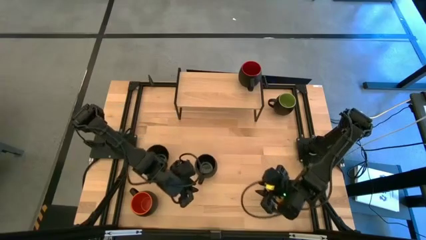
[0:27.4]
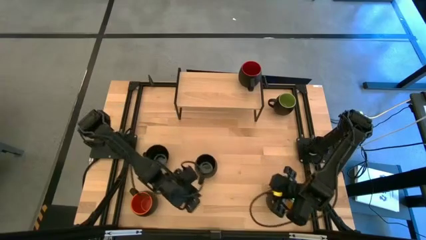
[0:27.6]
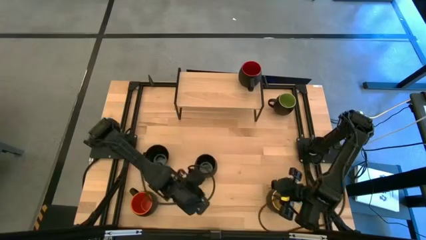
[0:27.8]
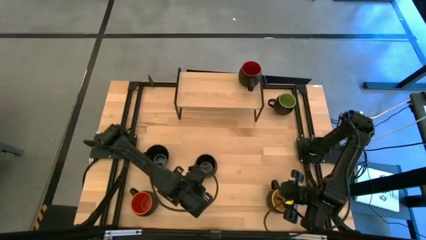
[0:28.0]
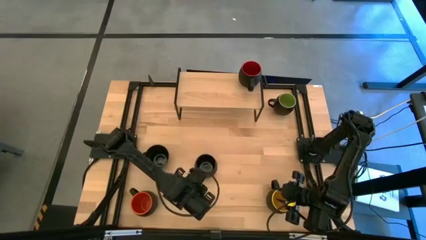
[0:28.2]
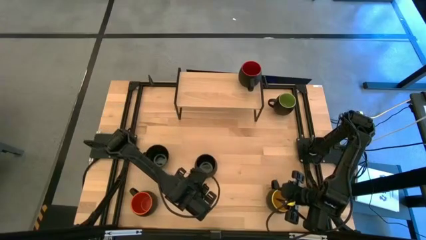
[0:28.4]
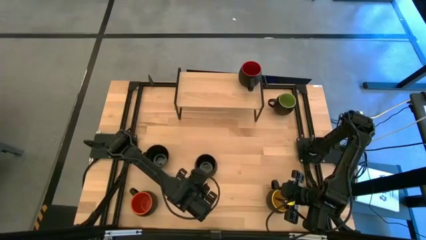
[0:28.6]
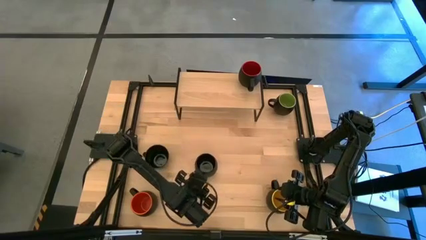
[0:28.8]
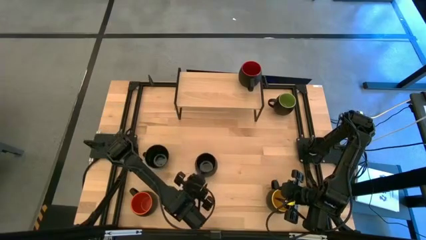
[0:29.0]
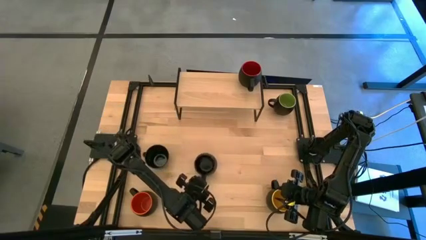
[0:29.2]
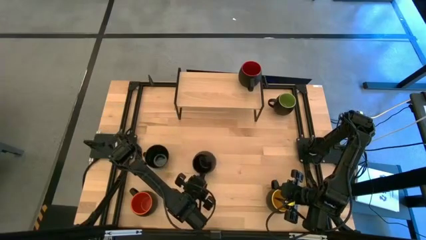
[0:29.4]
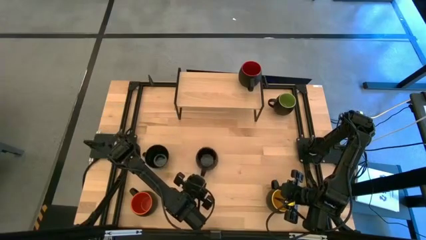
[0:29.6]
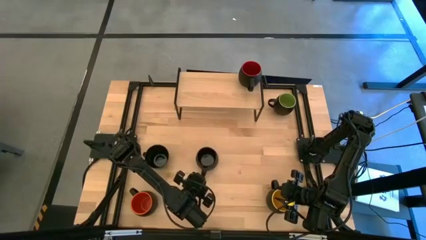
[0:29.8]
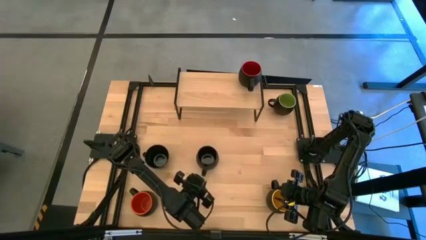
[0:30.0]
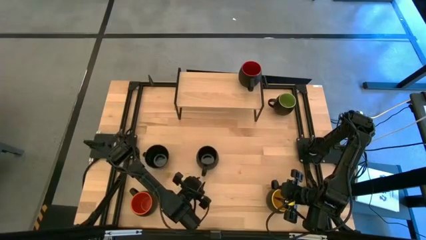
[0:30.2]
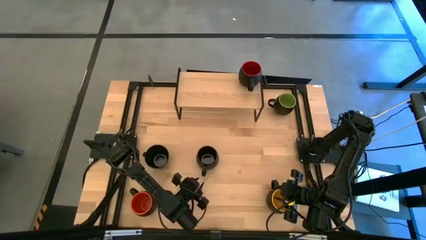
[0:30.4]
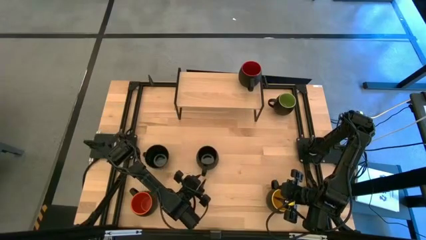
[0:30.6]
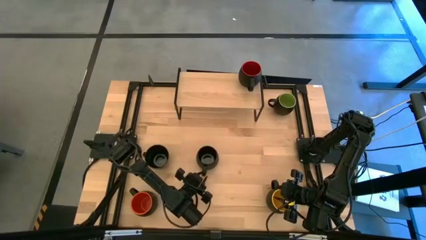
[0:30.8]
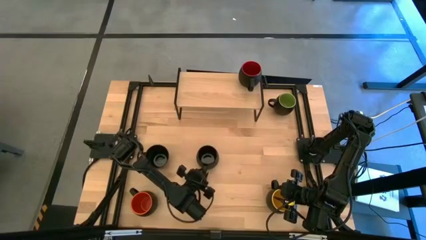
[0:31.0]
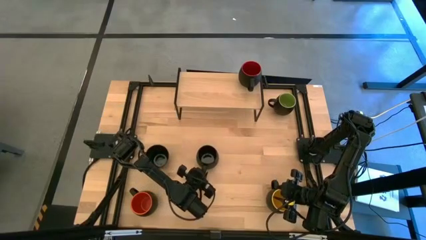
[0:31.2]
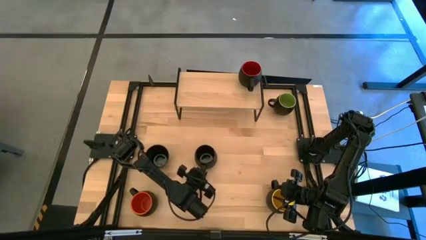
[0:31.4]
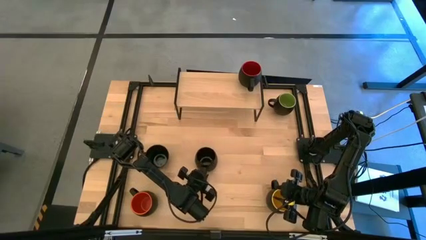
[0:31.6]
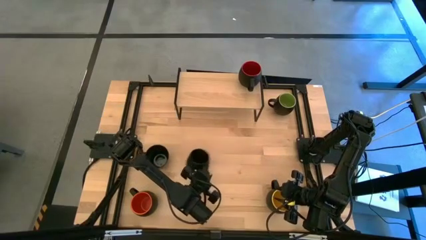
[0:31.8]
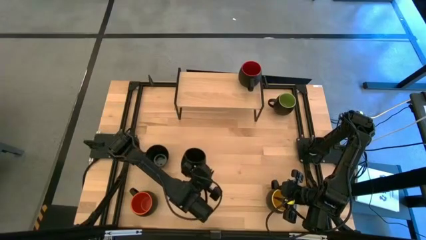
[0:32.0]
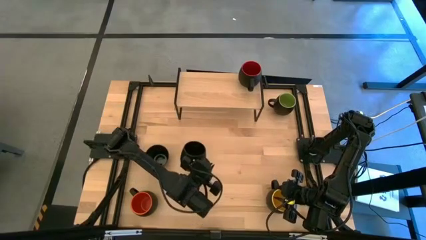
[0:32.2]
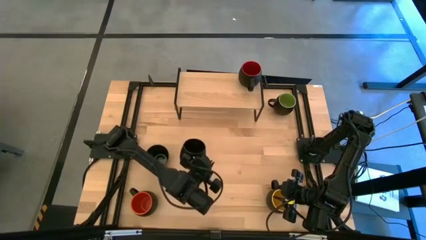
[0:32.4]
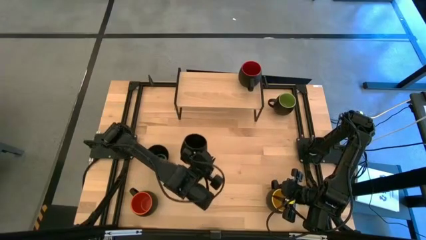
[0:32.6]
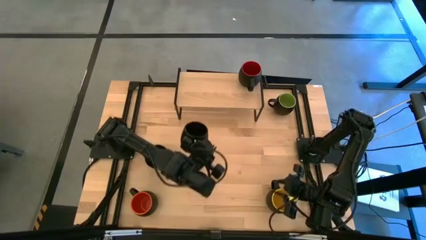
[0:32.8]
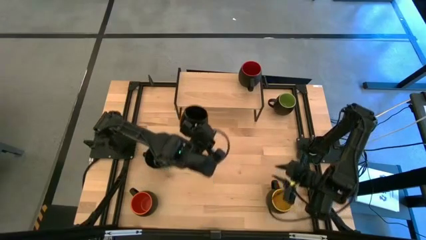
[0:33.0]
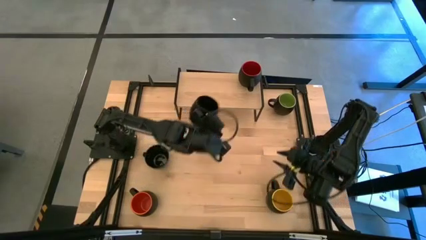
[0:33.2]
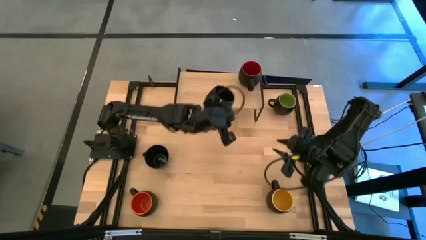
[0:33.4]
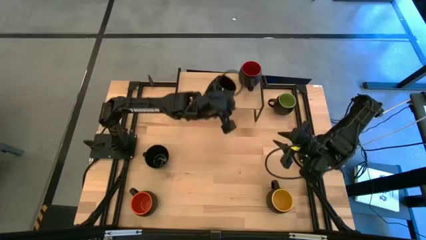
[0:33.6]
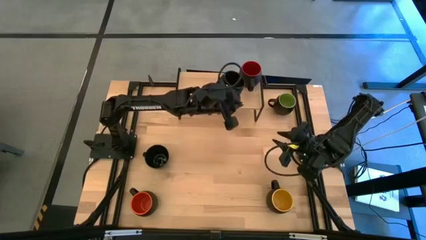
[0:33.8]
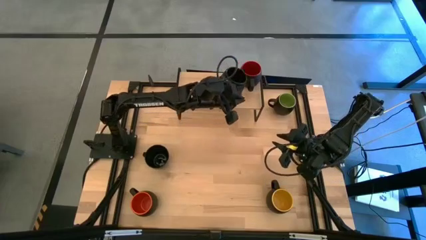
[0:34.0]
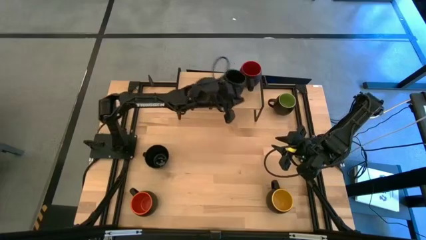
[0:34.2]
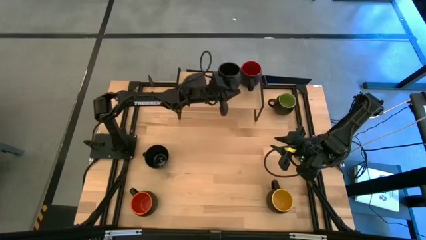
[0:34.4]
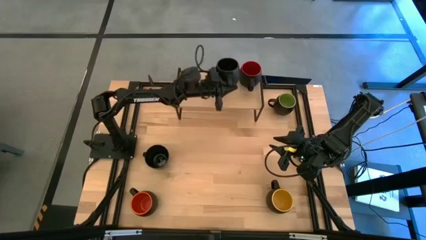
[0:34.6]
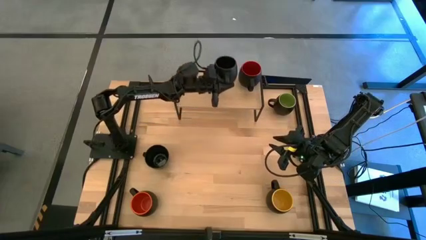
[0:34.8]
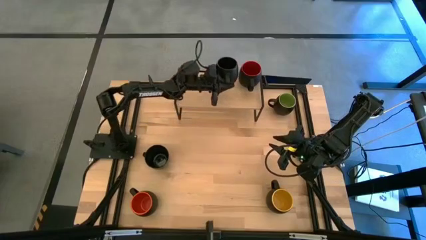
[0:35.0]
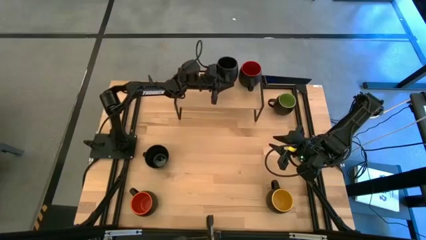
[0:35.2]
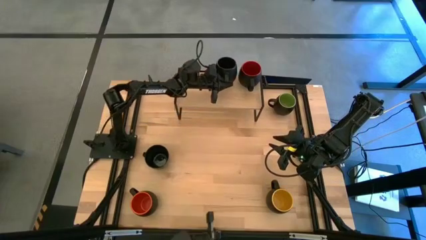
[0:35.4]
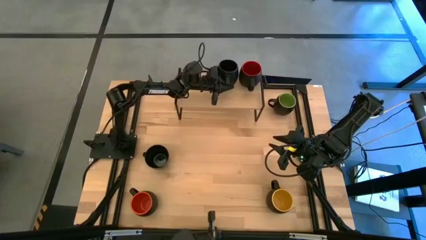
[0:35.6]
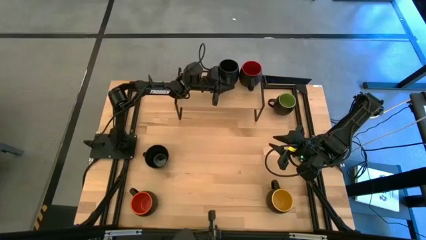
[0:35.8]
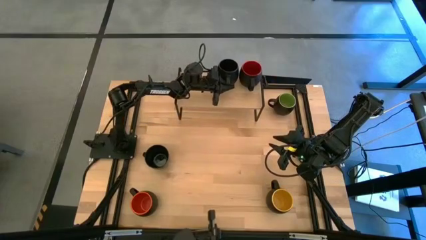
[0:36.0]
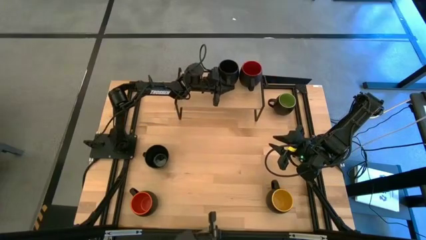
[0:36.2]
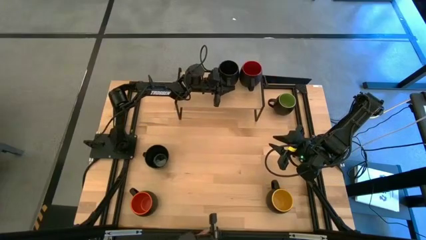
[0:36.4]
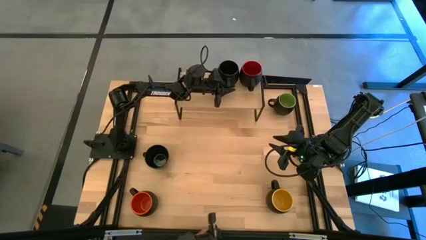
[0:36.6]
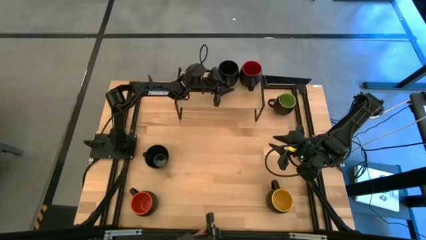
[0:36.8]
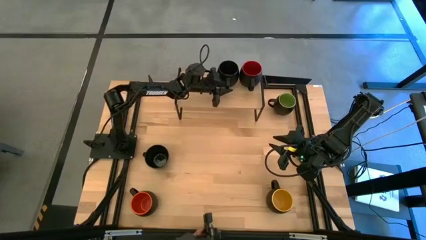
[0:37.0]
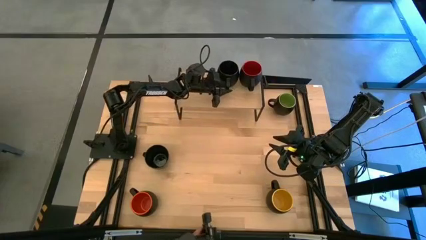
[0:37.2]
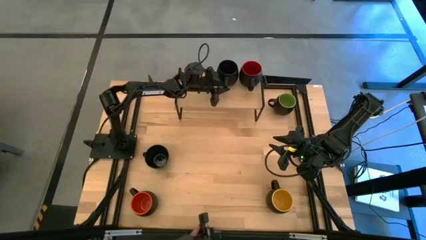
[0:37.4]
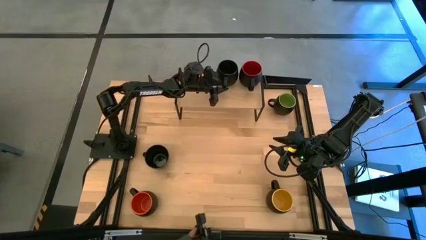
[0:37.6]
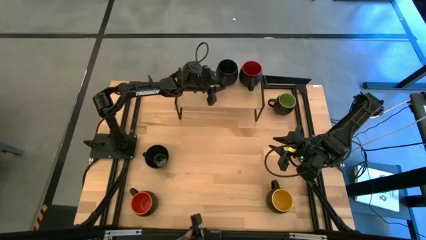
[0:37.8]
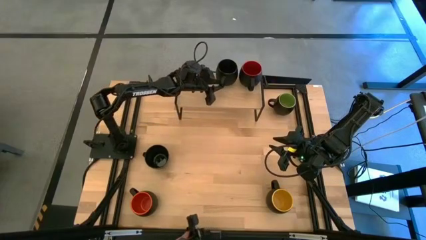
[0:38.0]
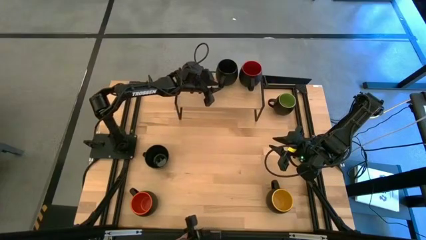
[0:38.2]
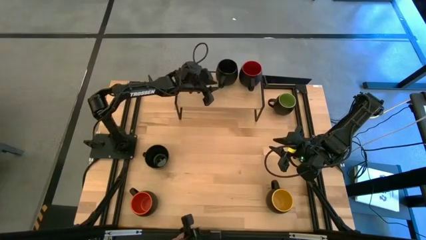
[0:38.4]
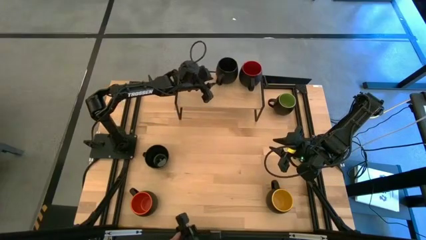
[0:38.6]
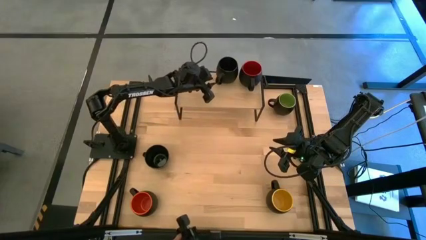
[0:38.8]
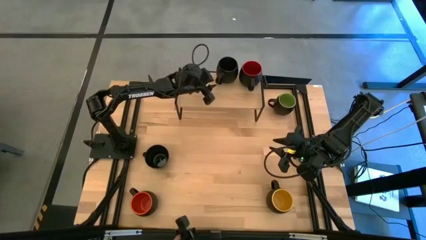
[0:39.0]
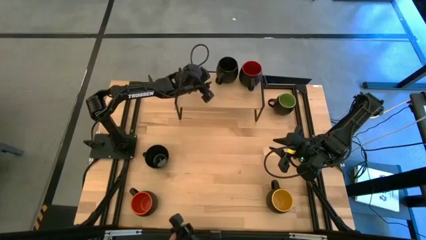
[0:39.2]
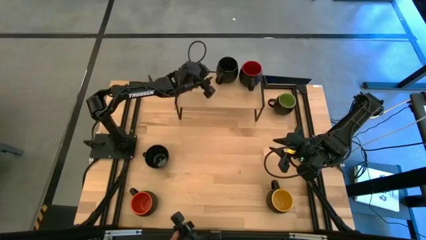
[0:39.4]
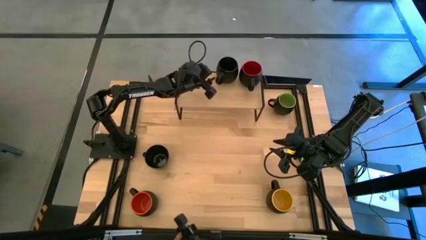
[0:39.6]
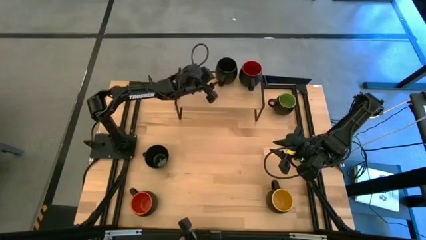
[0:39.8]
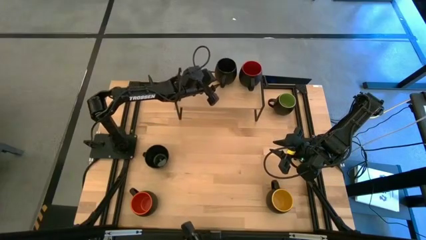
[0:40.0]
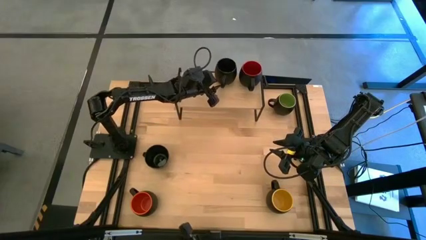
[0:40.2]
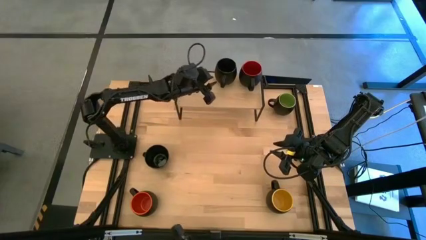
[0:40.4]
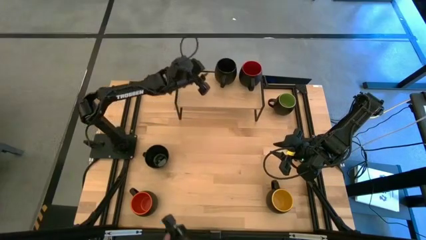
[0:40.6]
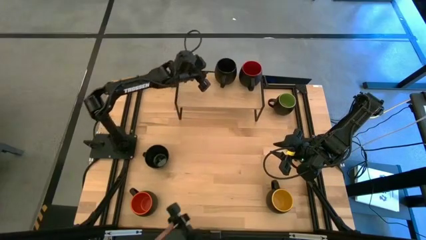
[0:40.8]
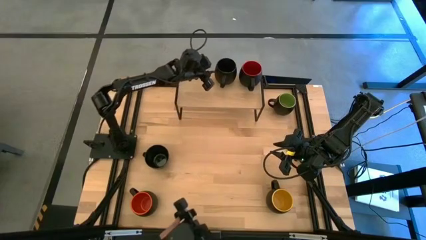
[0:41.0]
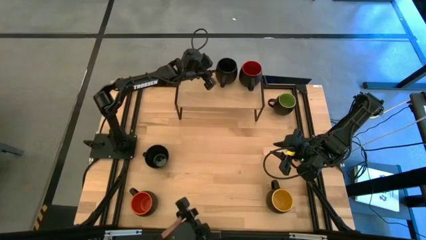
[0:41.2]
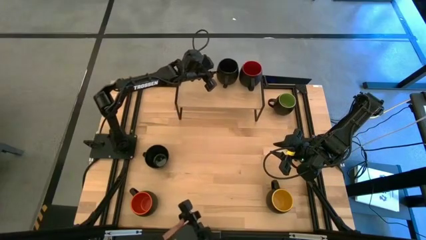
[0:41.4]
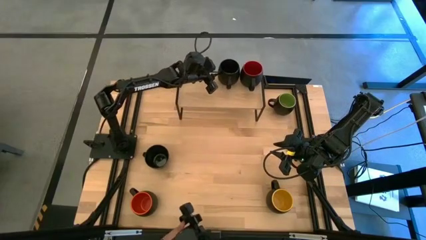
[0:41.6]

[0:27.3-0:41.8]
Task: Place coffee mugs
Put the black mug on the shelf

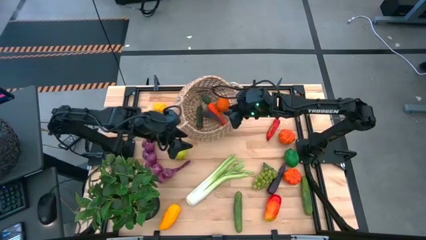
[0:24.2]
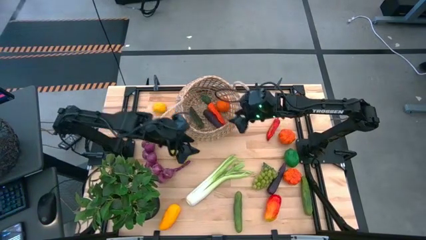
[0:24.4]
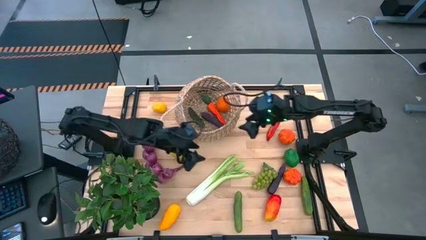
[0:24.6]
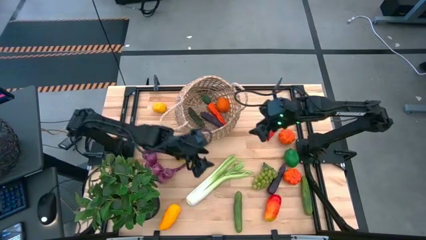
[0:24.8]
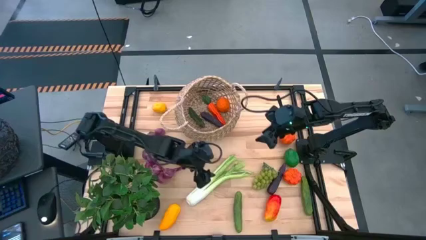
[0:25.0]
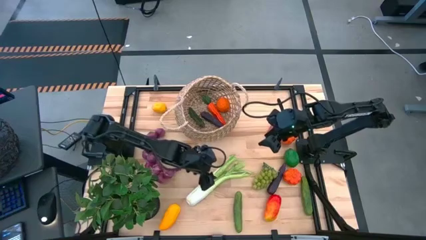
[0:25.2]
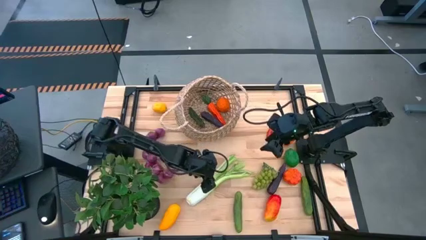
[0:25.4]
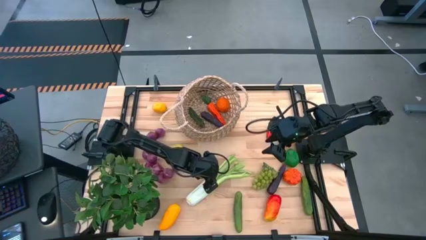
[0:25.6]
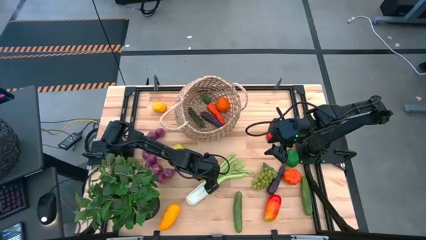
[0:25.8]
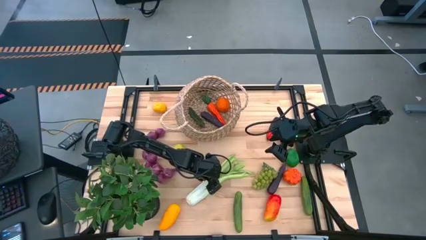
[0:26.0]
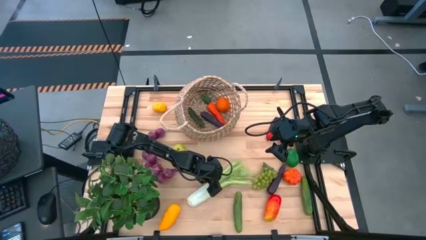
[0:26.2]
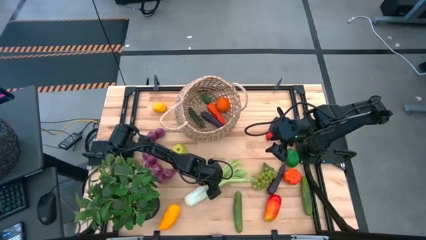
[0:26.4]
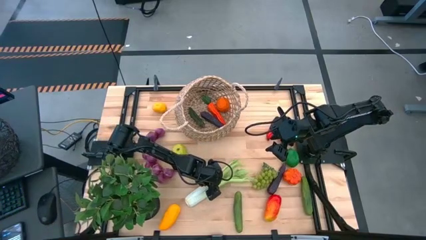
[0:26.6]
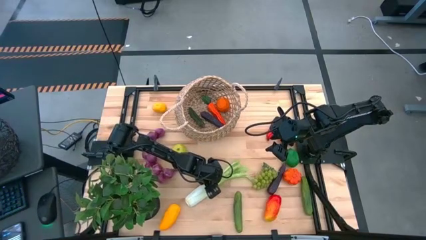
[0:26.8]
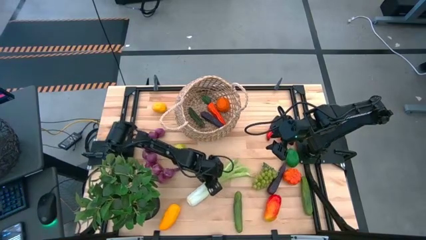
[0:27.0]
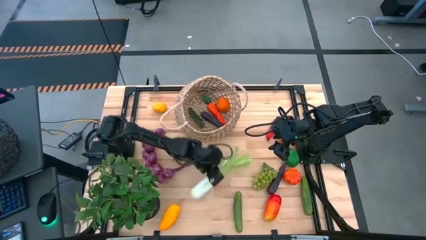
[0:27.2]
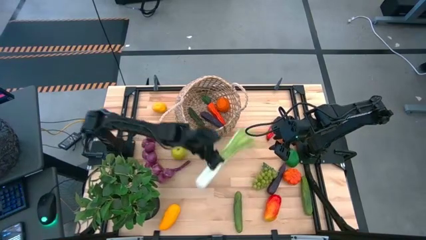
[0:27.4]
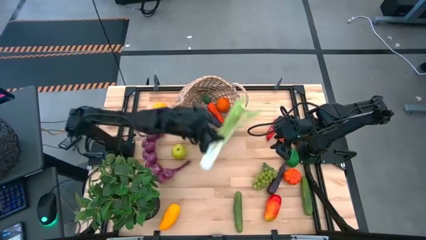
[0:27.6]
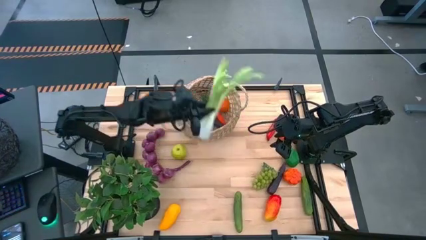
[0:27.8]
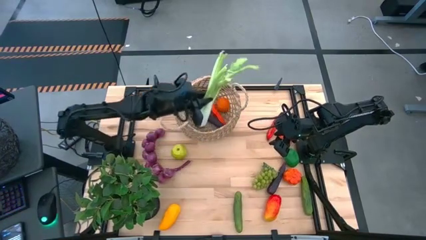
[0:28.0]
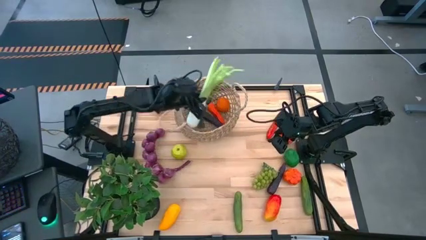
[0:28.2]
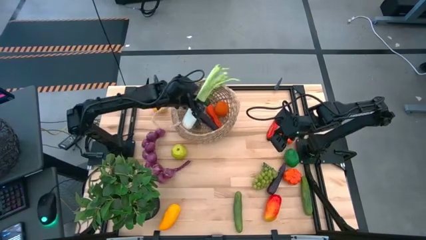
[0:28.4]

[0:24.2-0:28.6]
Task: Build produce basket
Put the celery into the brown basket
